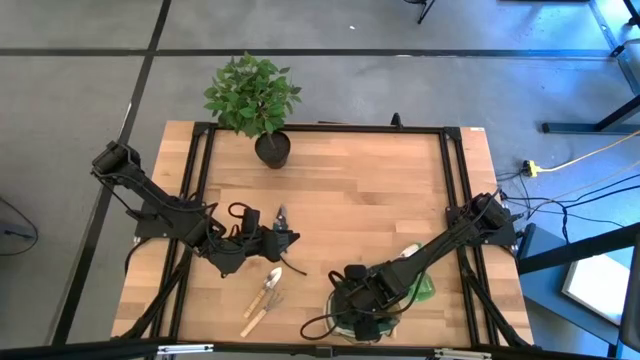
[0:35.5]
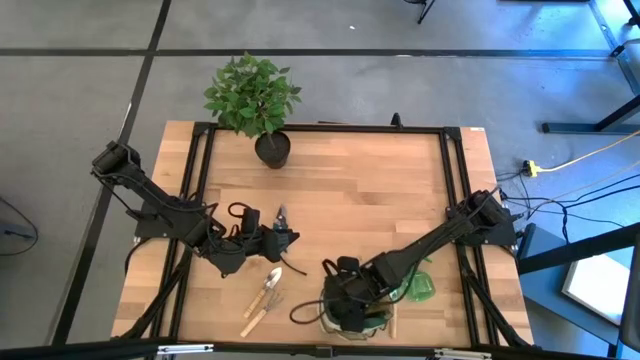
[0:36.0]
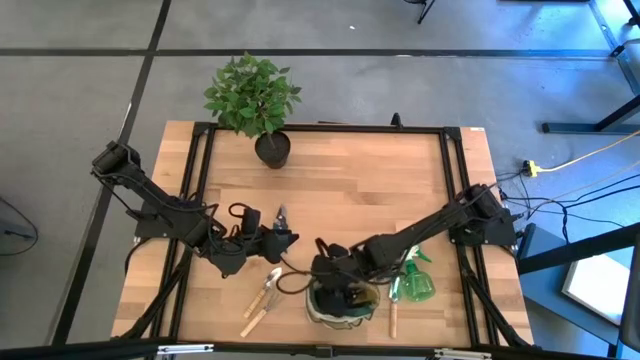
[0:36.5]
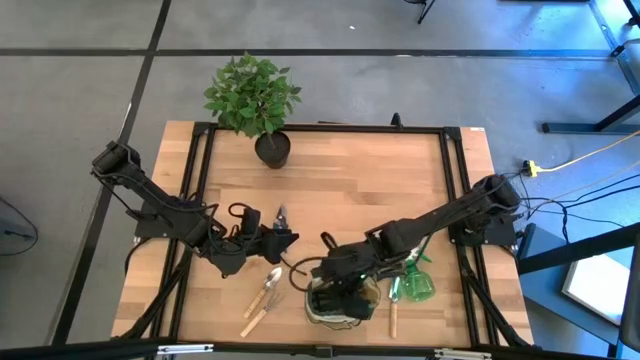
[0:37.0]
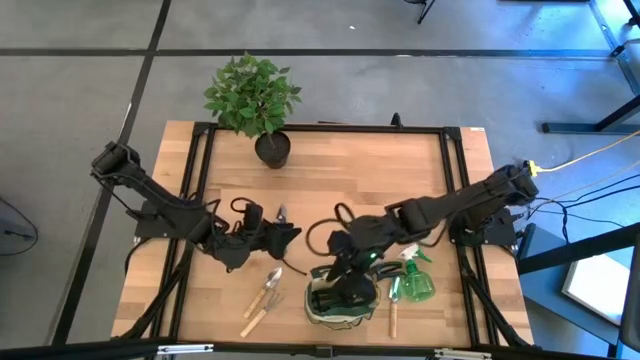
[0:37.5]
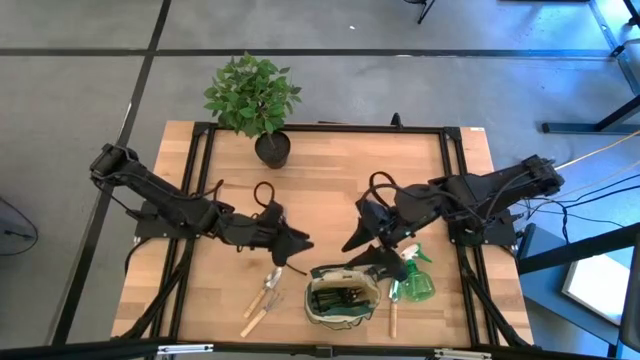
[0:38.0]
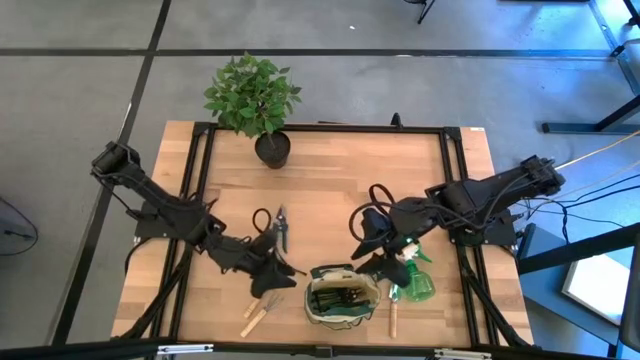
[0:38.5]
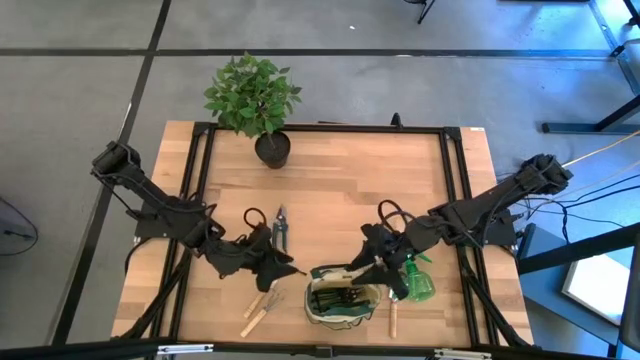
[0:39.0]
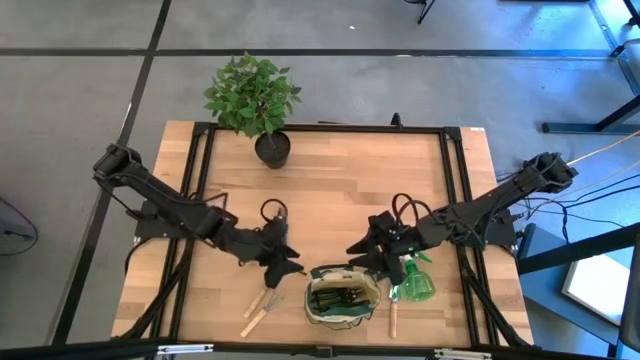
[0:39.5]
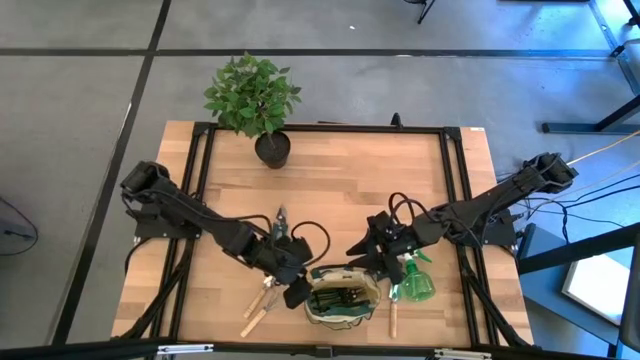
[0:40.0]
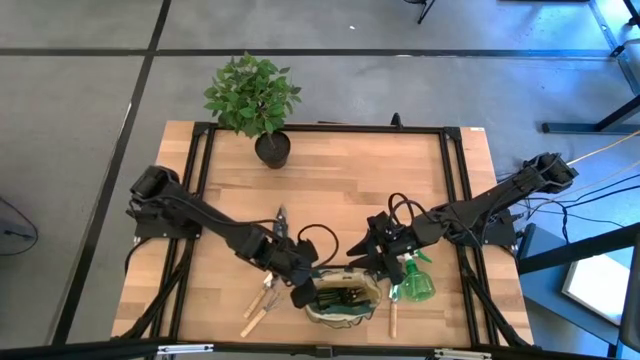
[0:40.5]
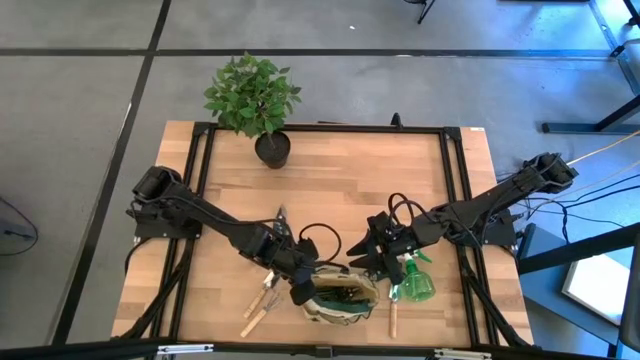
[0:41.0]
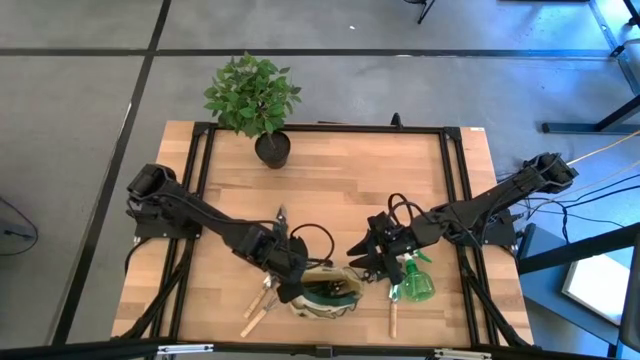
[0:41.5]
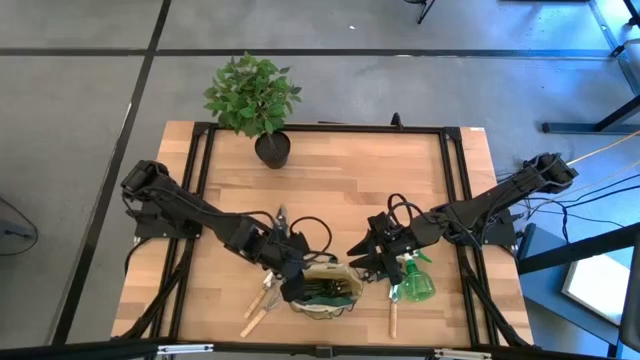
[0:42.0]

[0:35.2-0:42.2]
Task: Pick & Place Garden tools in Gardening bag
Adjust the brown gardening bag on the table

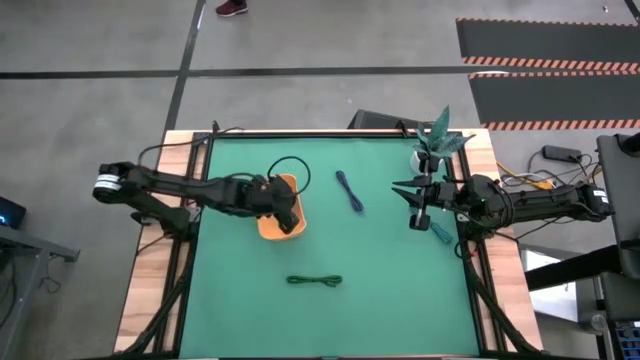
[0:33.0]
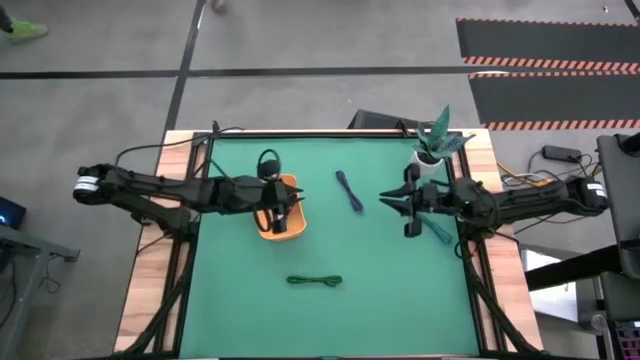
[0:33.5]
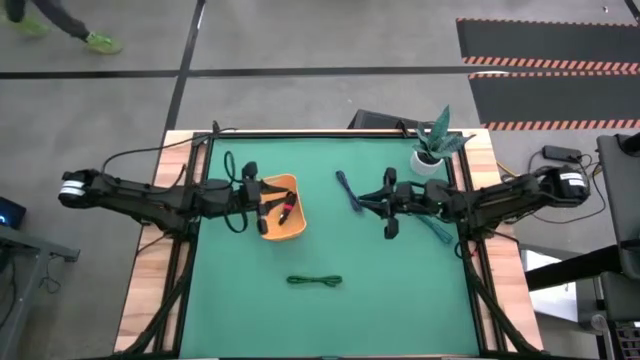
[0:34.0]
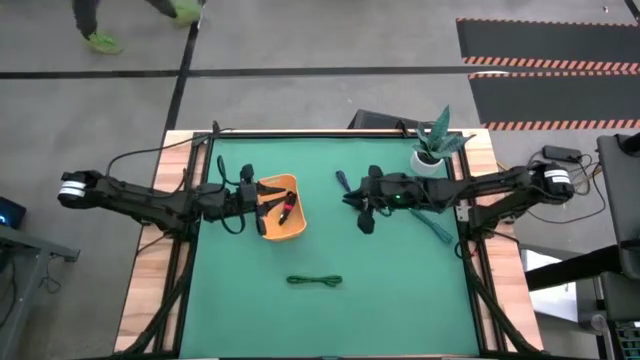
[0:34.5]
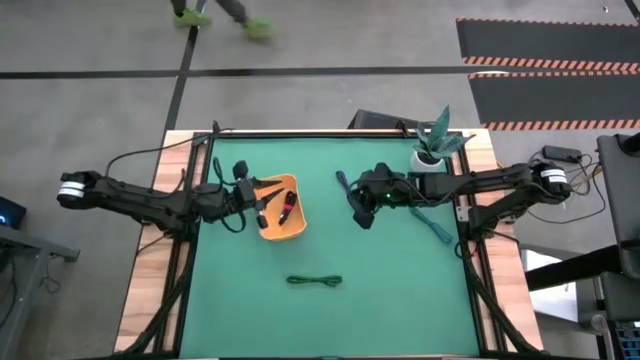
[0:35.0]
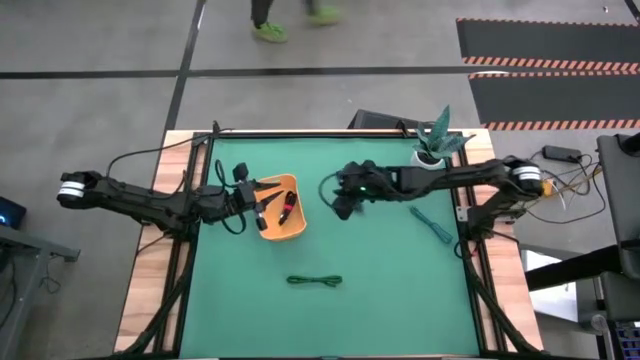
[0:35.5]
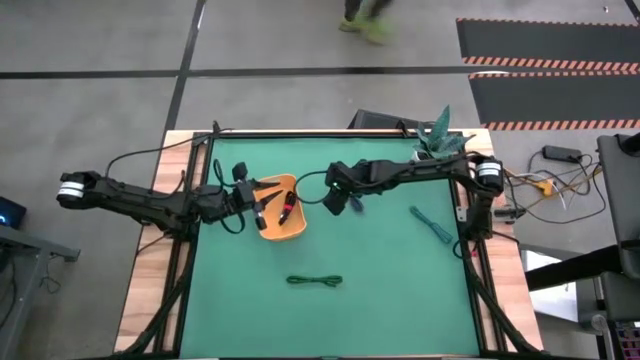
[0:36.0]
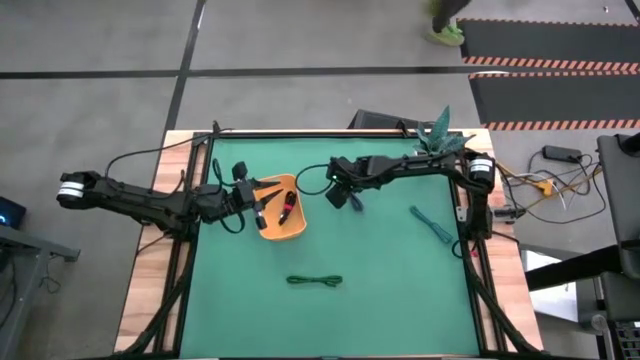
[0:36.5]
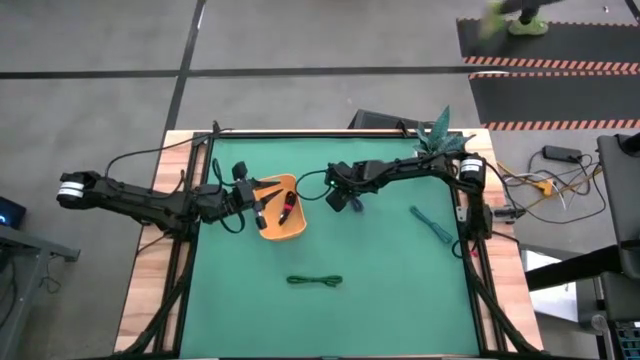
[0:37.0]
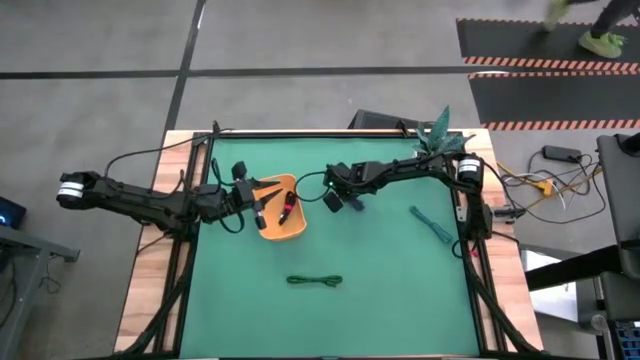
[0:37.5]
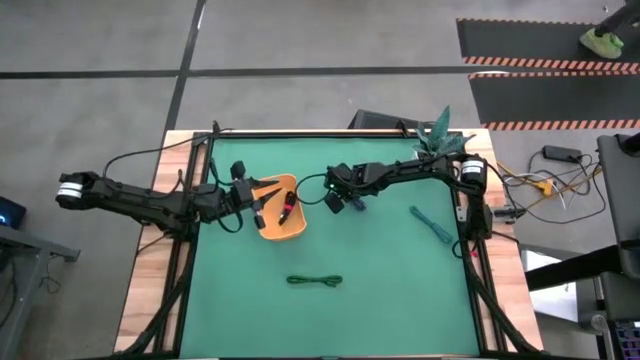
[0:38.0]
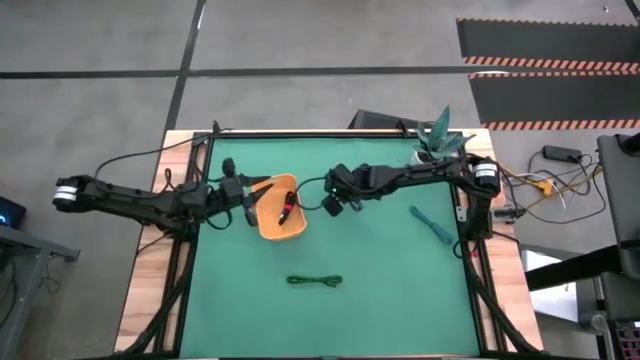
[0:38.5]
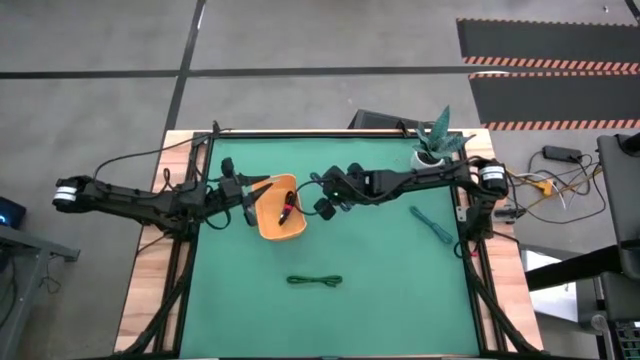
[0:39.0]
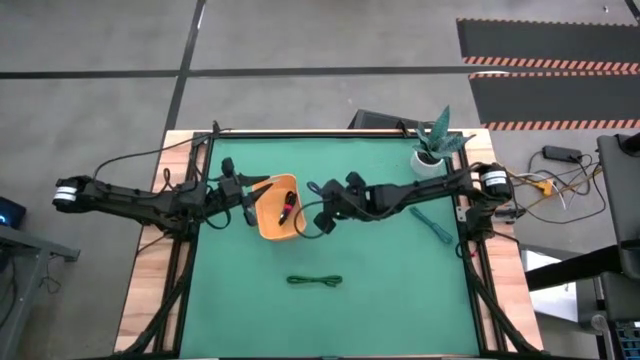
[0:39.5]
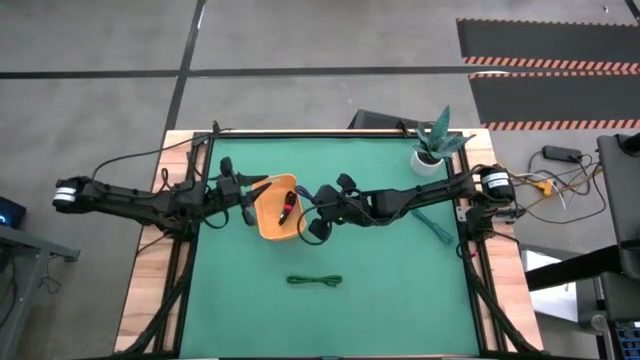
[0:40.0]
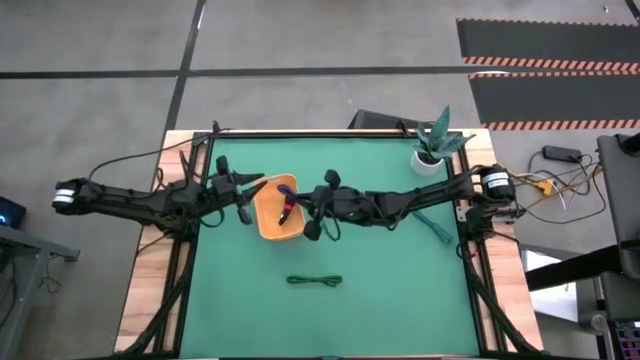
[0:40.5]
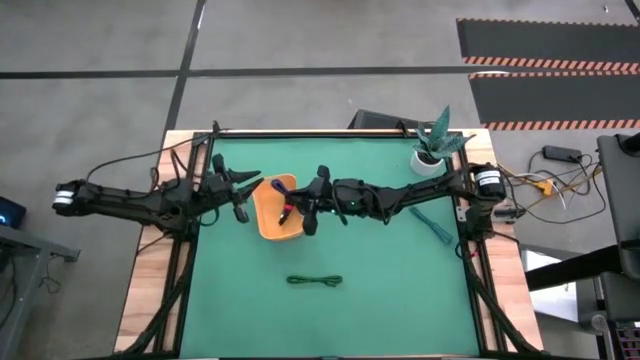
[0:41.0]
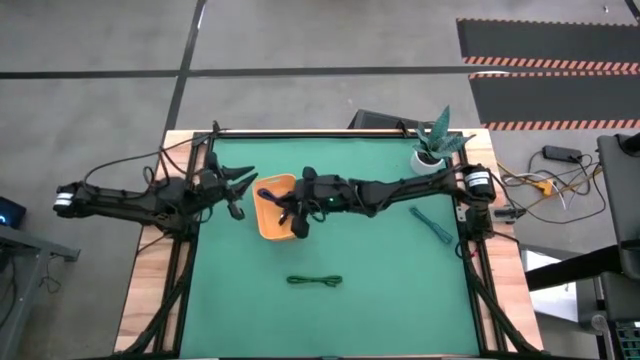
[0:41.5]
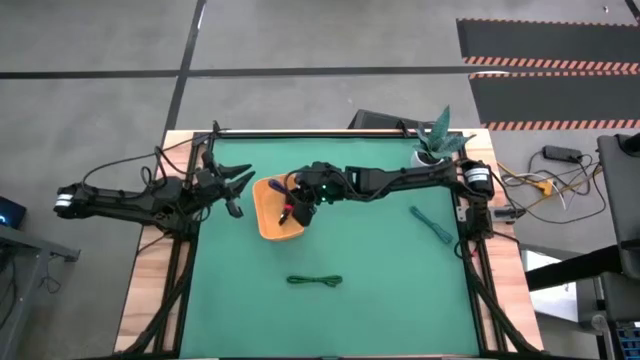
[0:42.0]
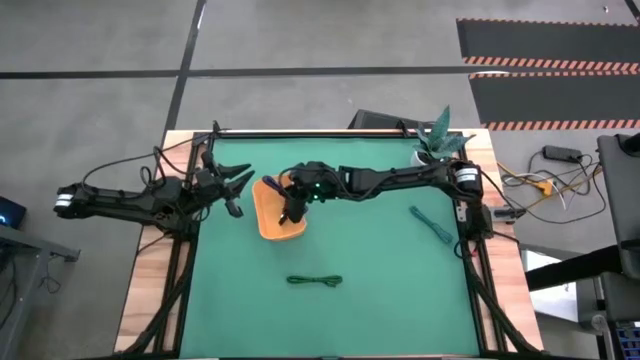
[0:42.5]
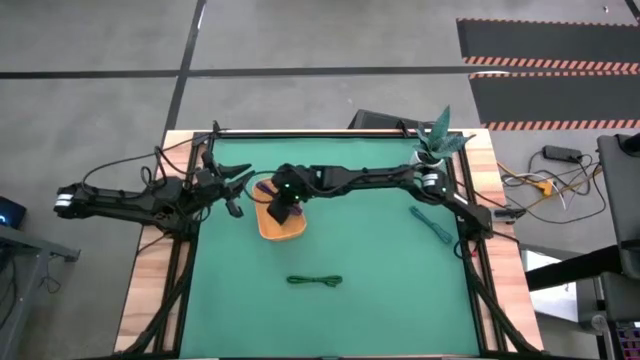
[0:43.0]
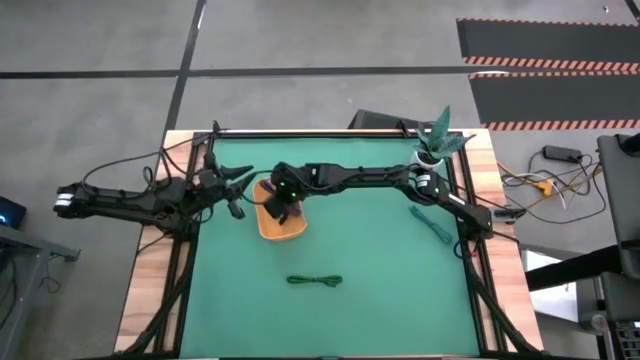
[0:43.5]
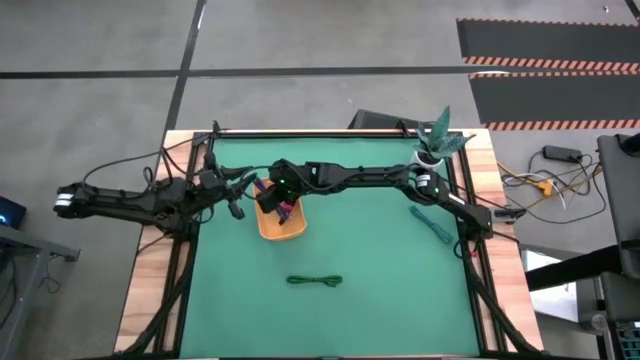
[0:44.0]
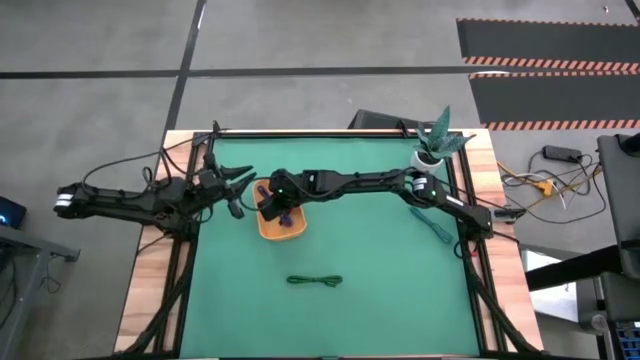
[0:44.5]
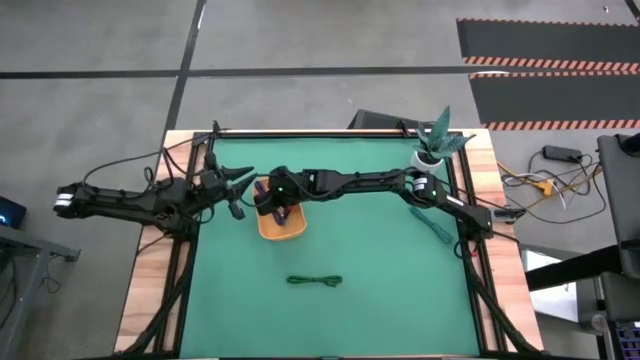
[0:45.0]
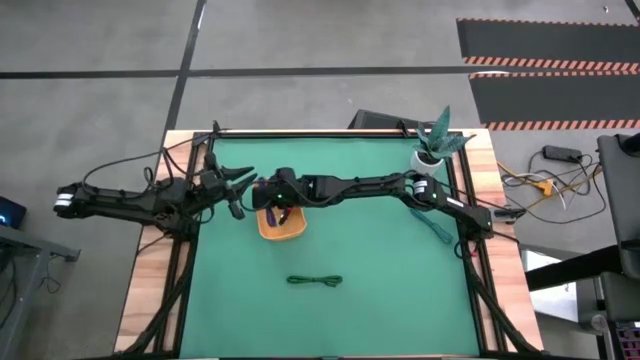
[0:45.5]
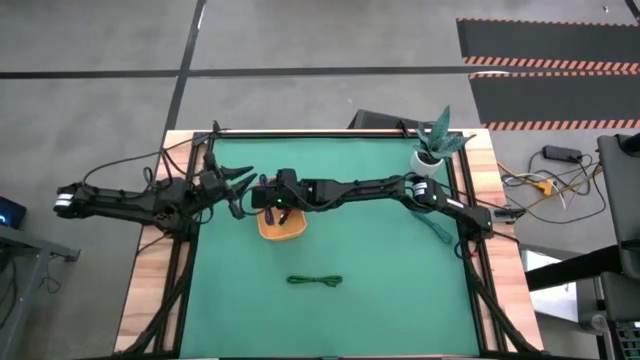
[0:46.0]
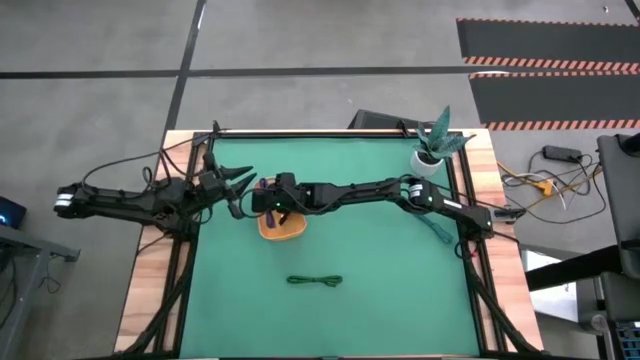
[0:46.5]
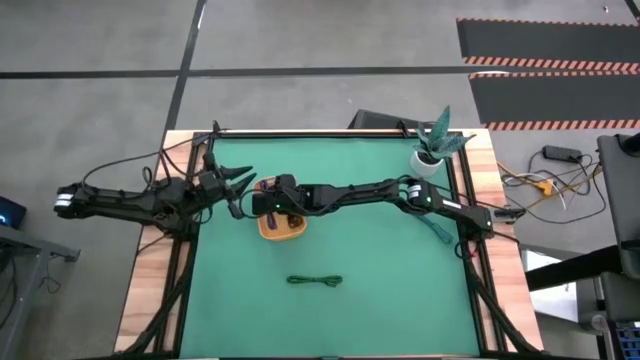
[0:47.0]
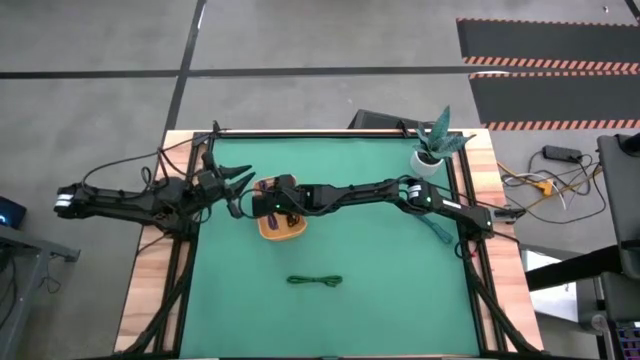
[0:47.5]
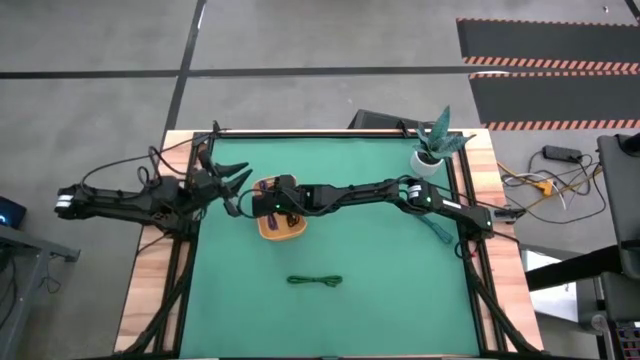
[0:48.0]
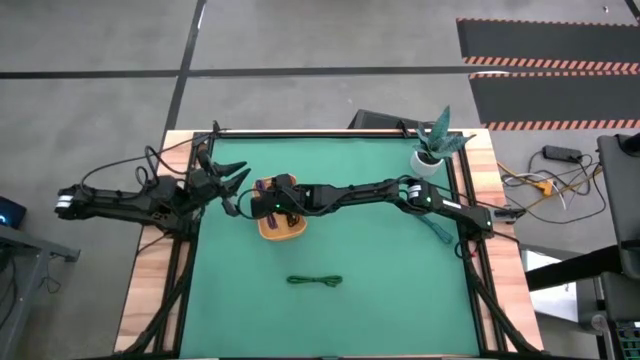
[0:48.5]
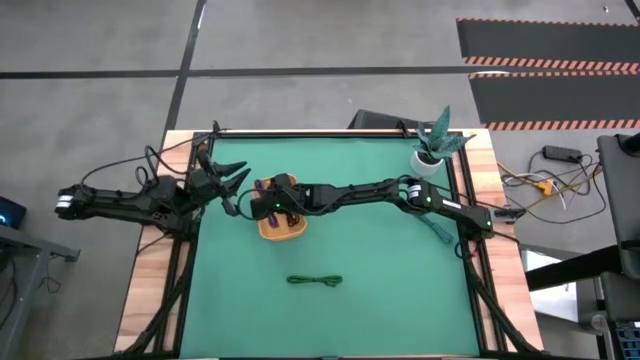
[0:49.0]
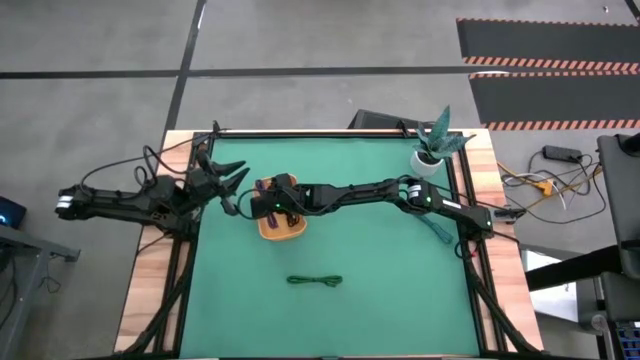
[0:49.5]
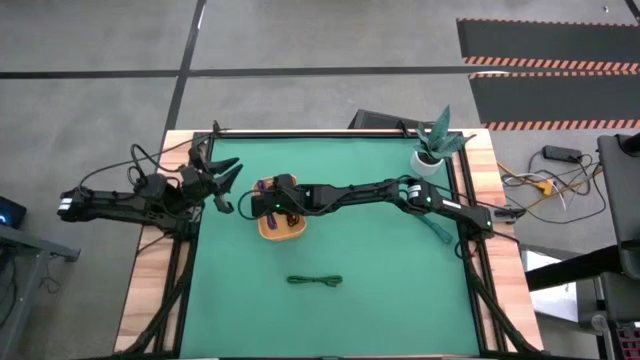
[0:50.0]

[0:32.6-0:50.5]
Task: Pick and place USB-C Cables
Put the violet USB cable into the orange bin
